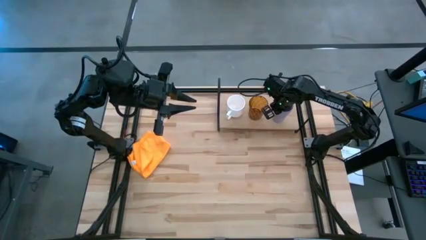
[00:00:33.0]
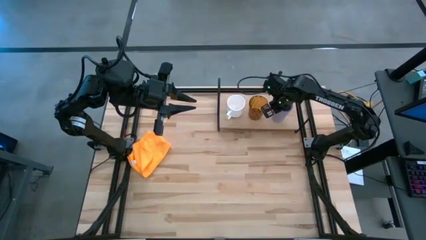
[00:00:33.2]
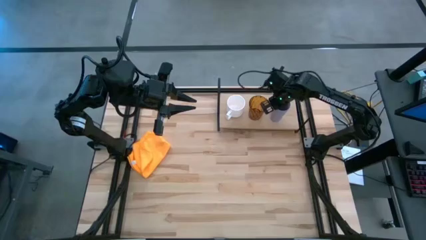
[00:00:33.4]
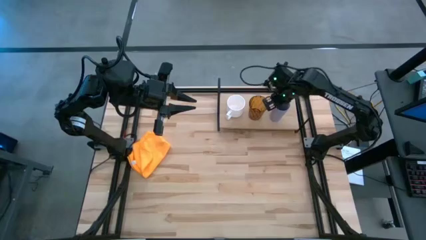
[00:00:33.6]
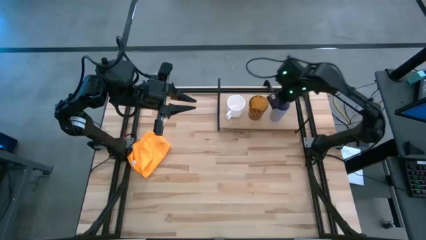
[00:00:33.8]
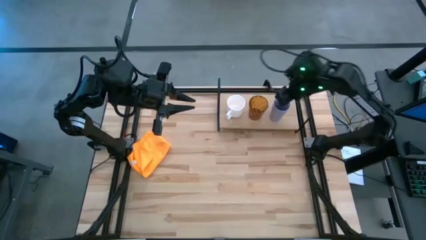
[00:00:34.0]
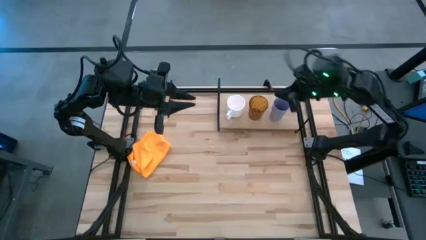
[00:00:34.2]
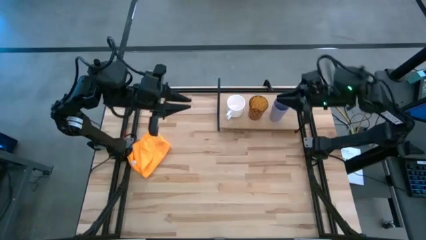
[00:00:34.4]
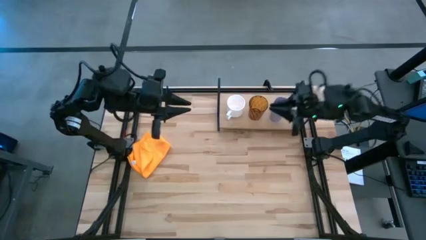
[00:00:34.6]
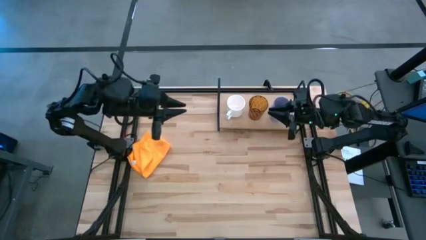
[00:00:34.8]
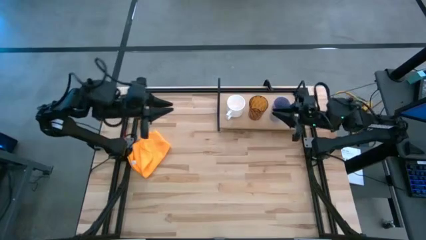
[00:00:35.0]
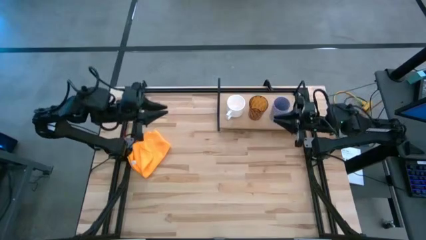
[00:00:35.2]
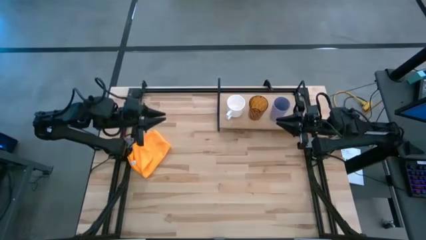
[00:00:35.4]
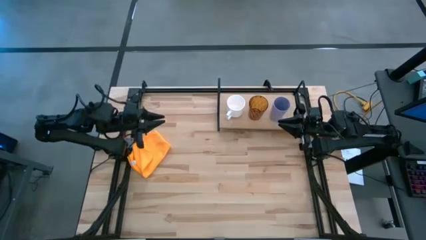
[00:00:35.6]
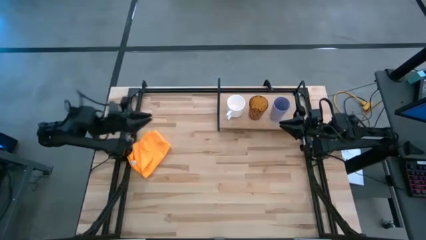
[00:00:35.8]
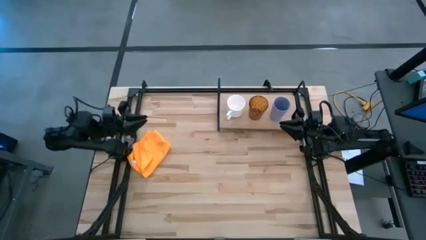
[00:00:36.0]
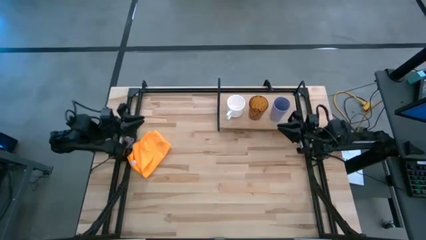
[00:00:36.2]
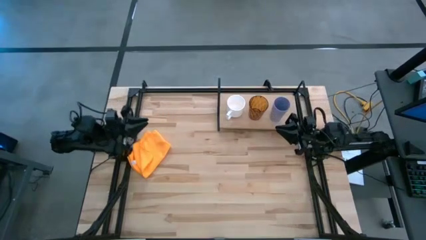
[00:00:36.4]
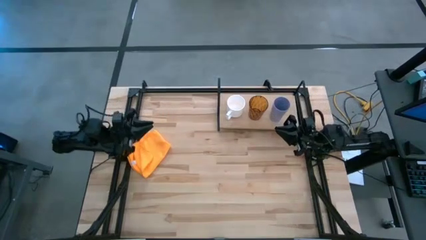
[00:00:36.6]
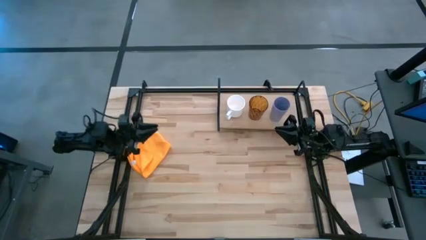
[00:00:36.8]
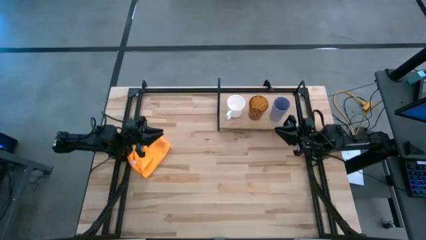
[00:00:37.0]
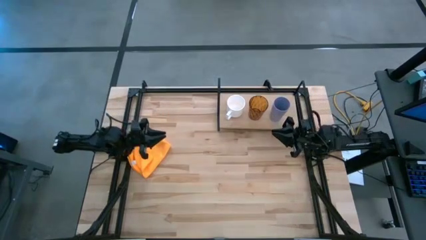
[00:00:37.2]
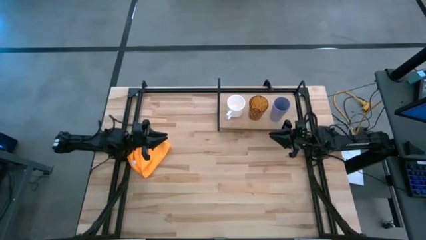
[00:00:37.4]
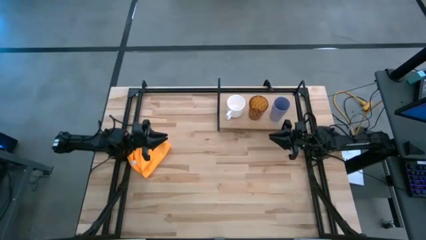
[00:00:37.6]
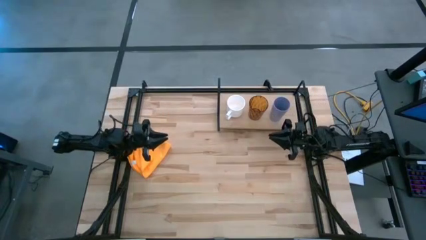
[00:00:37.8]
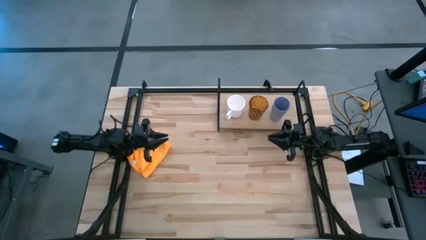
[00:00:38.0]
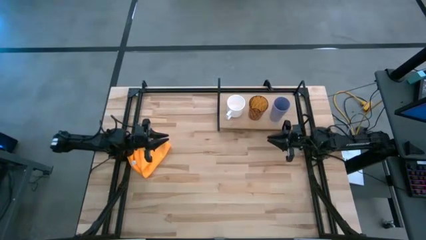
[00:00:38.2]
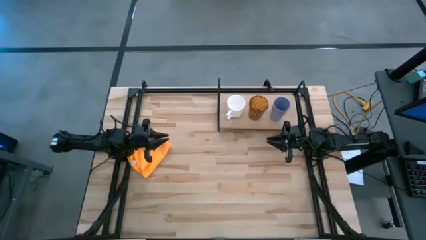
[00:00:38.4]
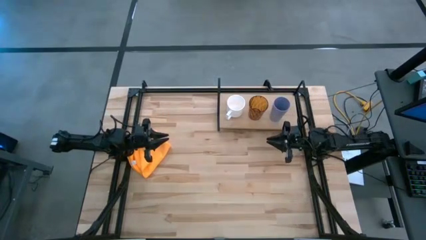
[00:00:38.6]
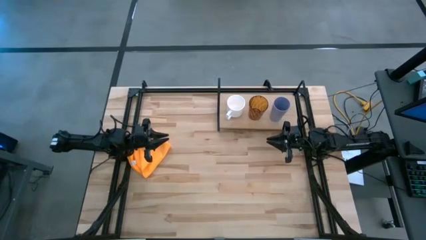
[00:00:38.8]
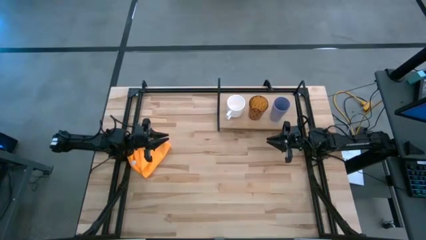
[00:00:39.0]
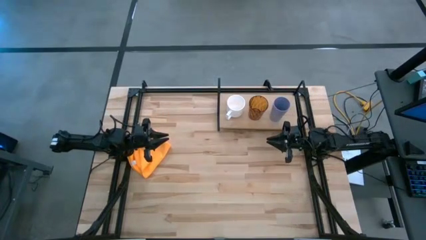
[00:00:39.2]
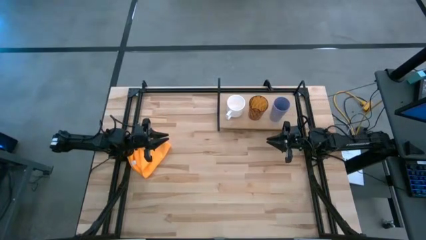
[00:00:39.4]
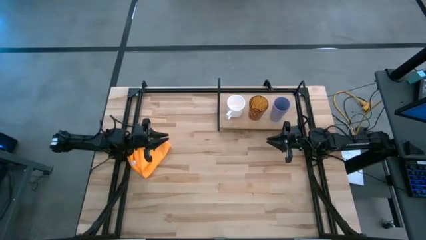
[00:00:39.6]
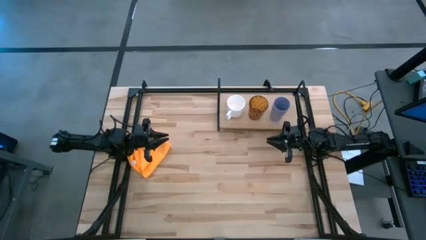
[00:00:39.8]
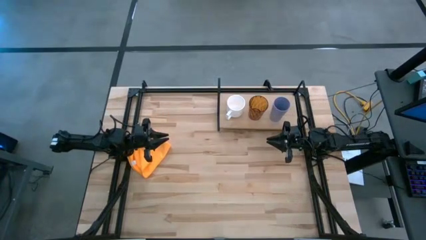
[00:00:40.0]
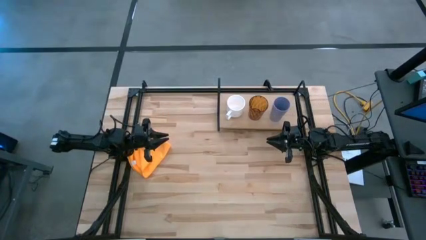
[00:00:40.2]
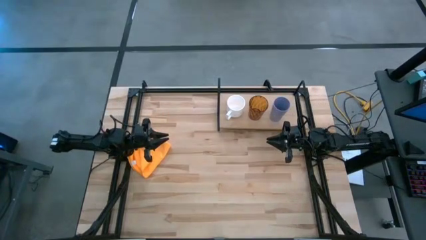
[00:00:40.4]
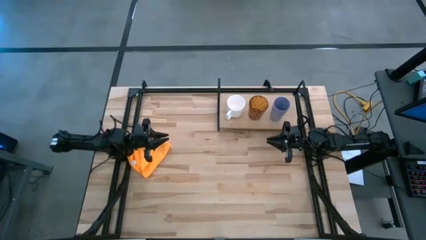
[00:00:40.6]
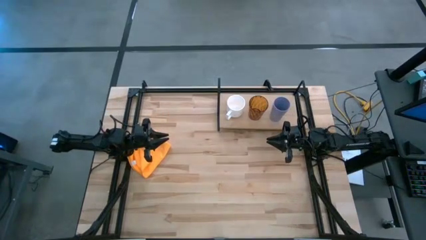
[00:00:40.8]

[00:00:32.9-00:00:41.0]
Task: Stack small to large cups/mugs on shelf
Return to Home Position

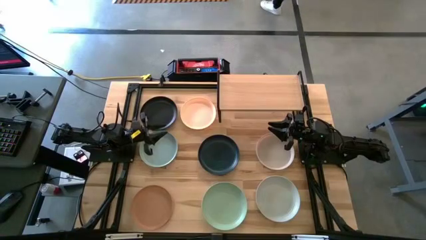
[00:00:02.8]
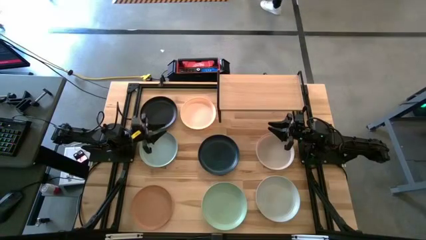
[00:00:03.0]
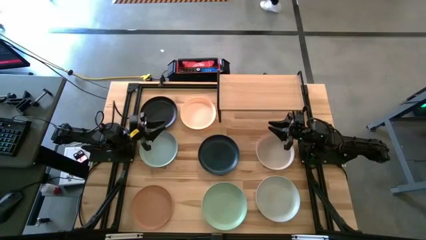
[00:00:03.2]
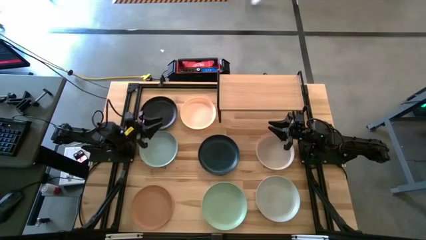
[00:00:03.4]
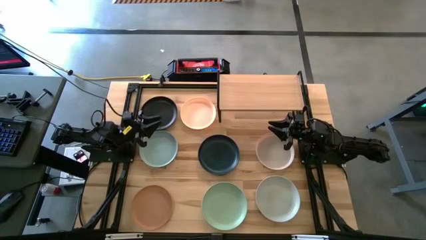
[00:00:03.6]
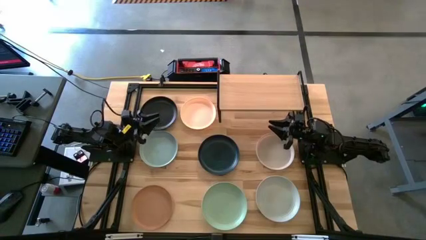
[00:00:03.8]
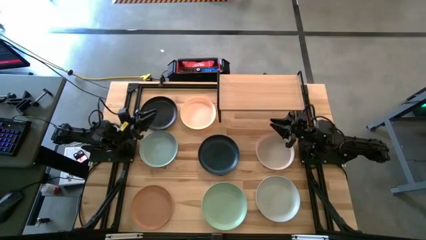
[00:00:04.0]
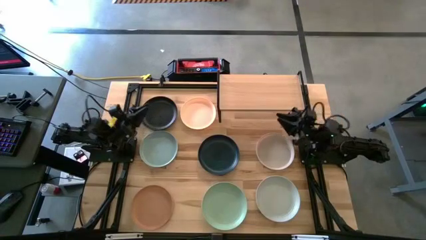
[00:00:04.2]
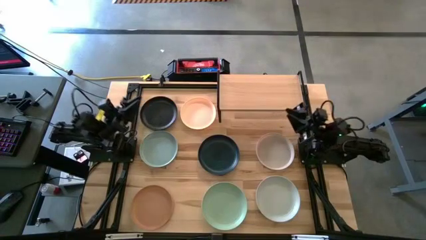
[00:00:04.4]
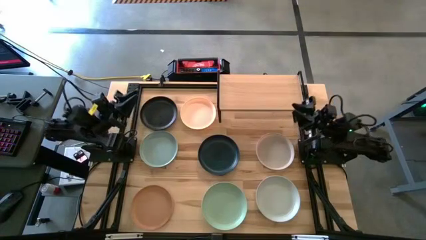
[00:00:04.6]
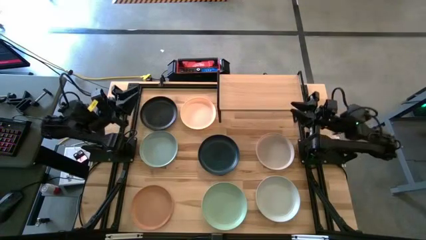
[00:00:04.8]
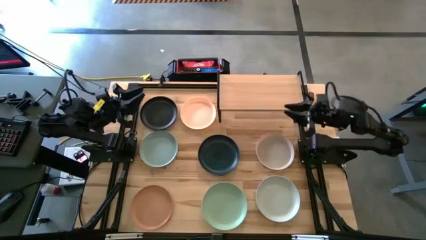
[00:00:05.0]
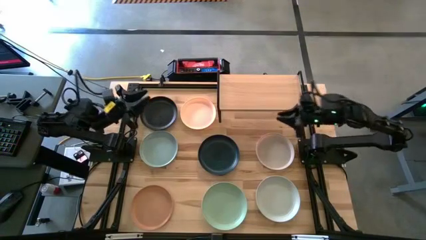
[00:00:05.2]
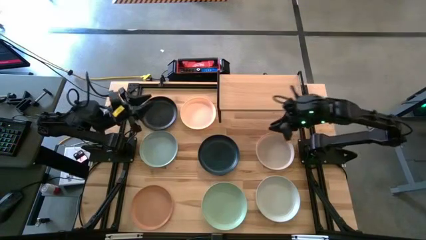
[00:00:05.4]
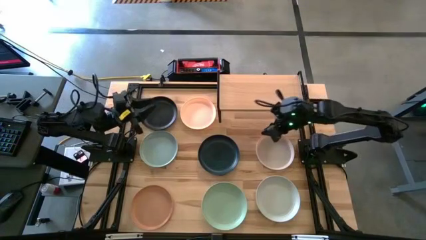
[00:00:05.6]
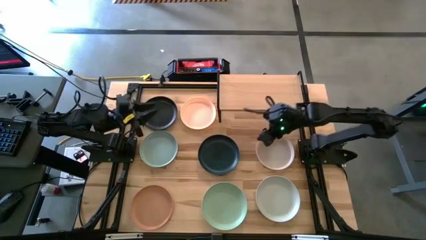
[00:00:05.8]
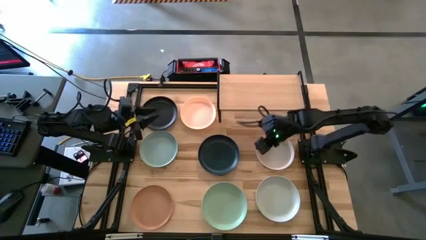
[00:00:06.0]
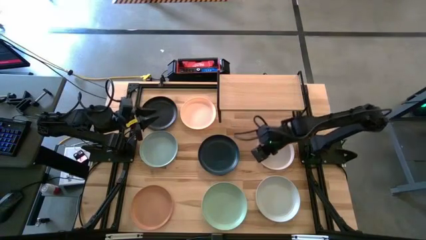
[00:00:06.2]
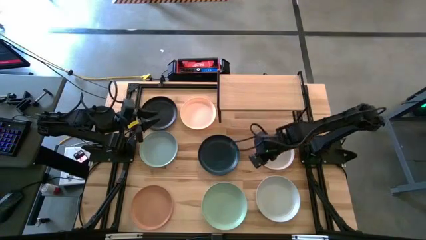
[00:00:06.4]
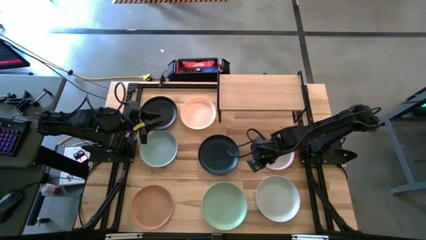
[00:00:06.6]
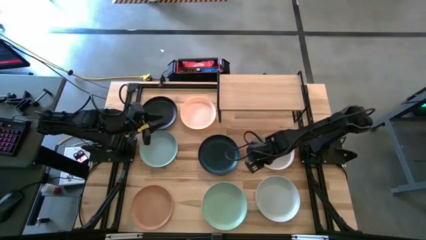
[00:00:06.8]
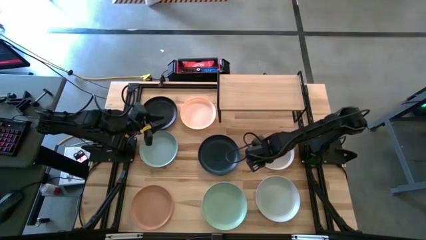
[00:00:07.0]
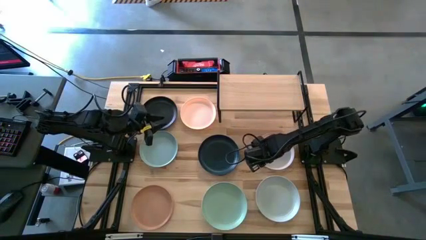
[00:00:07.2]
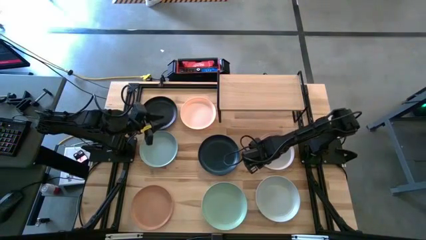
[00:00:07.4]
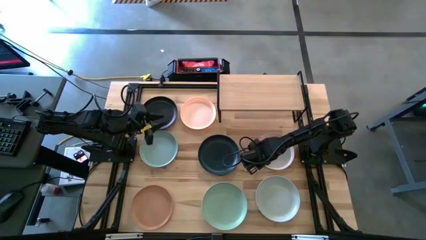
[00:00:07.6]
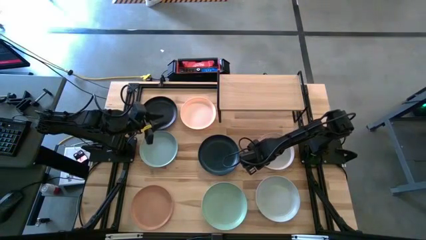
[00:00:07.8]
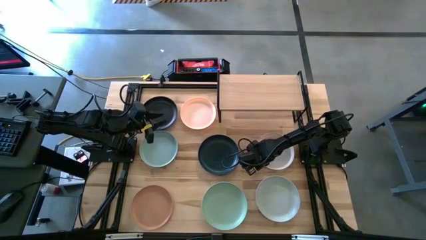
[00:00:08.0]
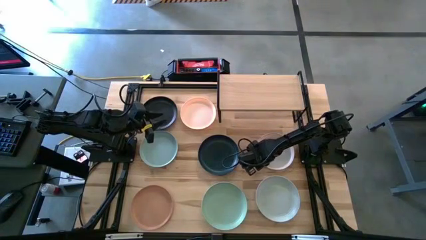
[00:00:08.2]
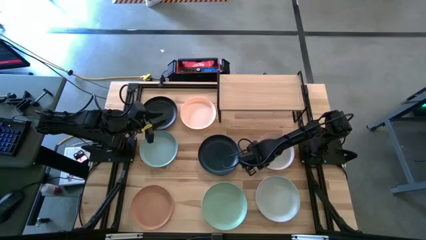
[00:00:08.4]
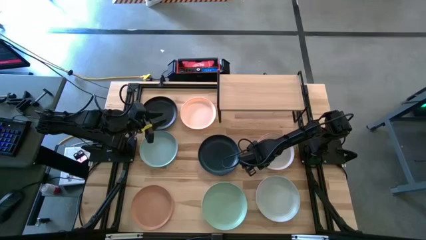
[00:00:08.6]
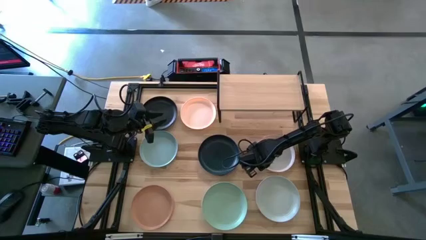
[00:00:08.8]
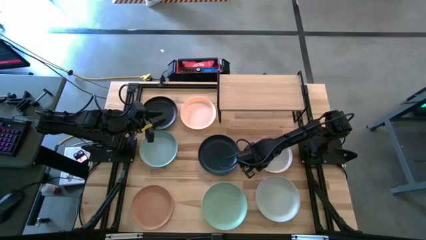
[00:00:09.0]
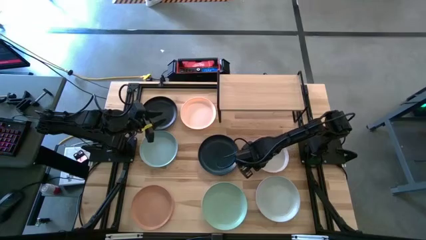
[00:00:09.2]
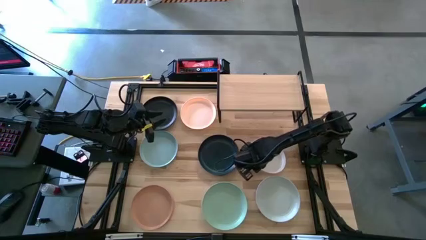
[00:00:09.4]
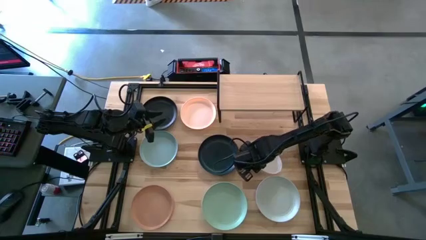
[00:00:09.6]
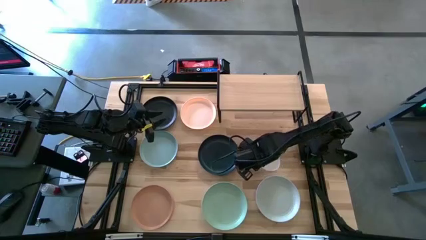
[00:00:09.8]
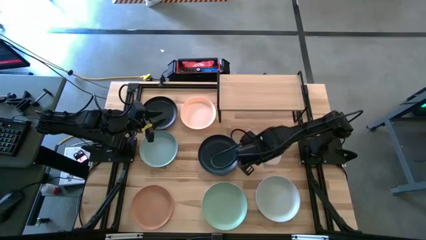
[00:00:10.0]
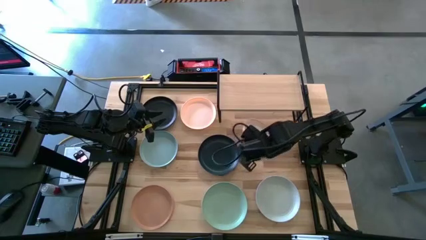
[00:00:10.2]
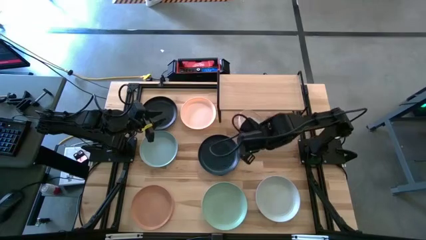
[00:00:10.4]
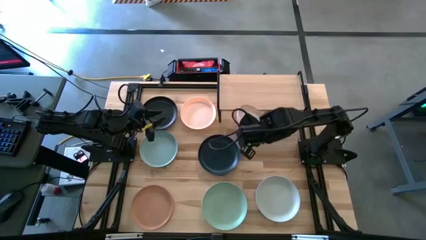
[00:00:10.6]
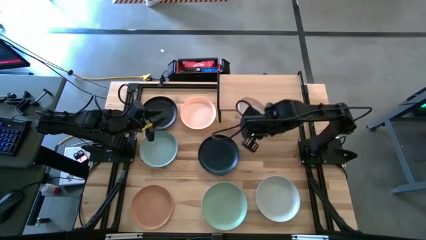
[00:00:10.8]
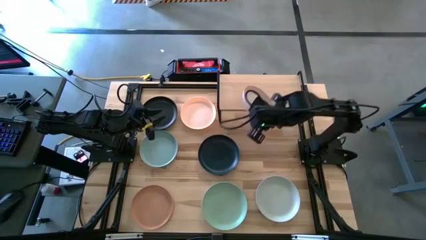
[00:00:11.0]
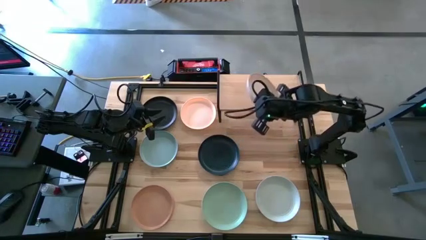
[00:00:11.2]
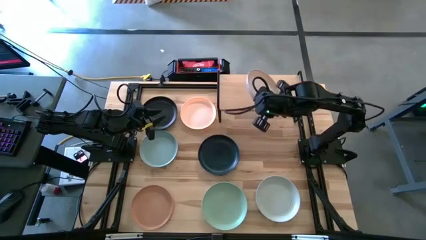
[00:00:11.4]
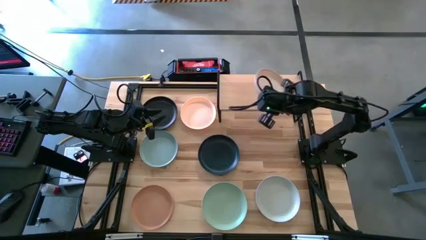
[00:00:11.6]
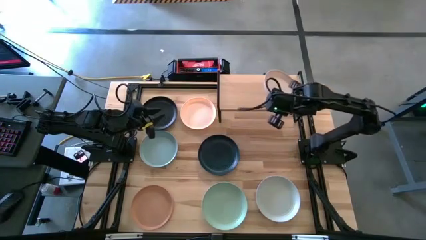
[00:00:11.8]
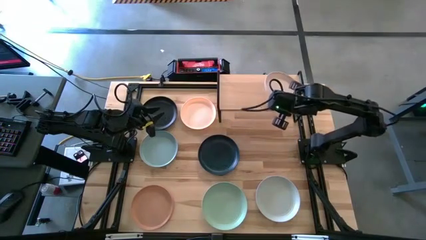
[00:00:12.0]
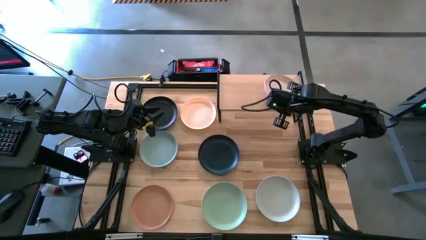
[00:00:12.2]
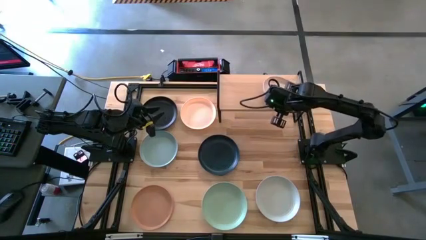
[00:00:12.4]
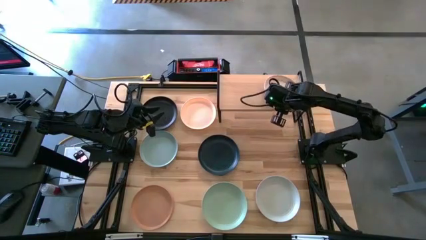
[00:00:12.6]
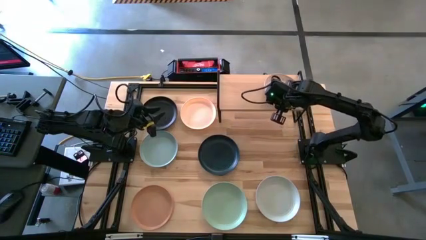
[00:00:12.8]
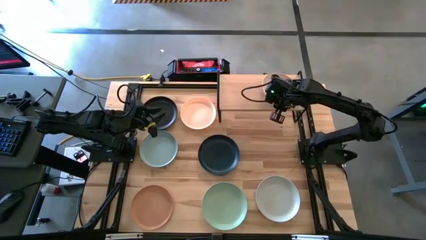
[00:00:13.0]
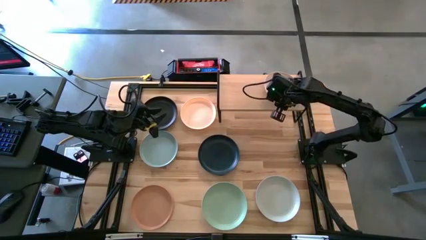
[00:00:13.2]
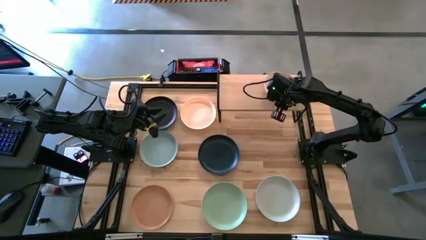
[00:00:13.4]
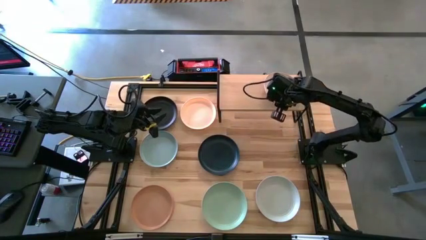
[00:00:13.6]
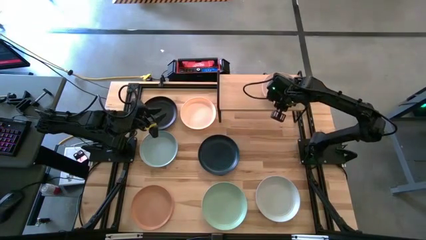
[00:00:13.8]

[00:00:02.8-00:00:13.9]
Task: Place and stack plates onto a shelf
Put the white plate on the shelf
